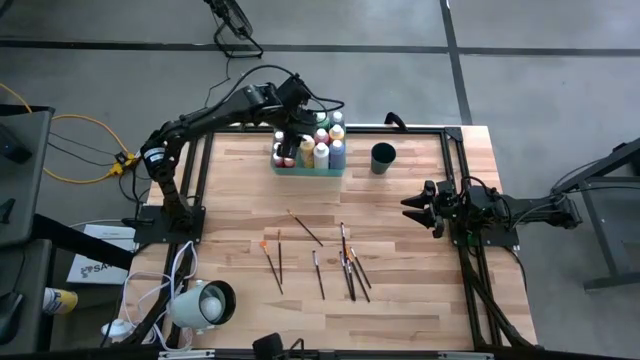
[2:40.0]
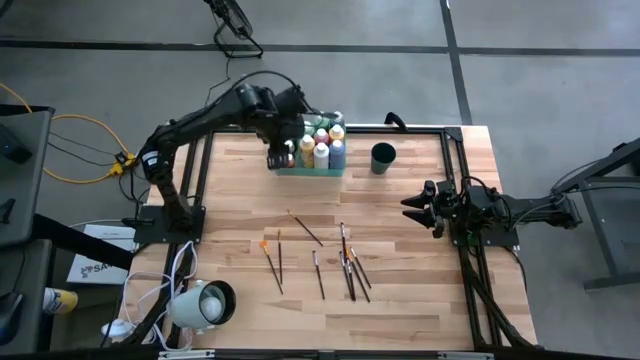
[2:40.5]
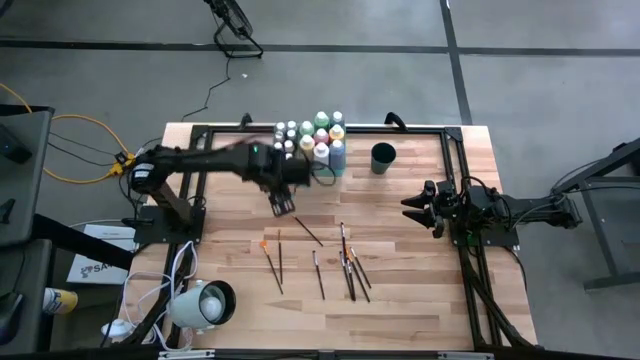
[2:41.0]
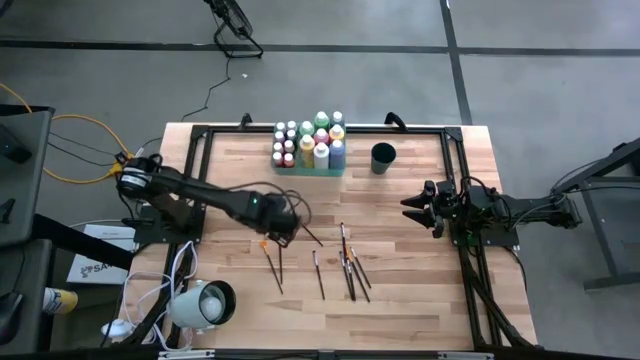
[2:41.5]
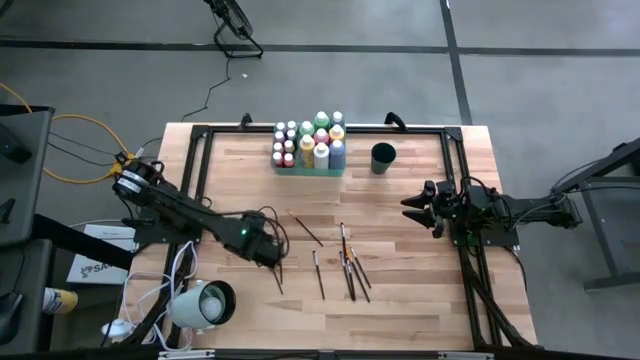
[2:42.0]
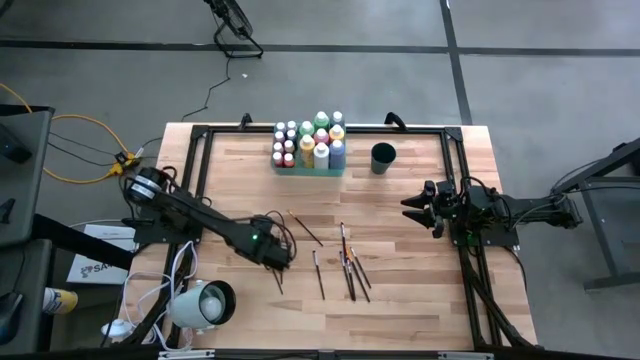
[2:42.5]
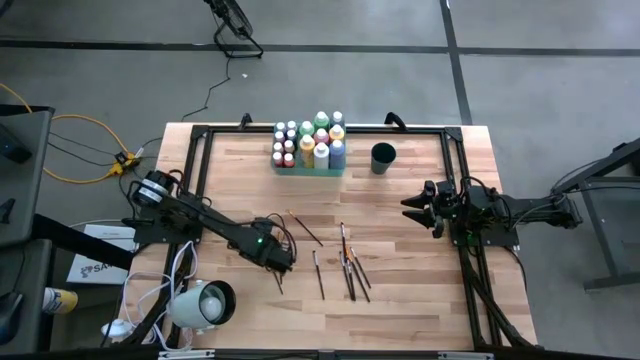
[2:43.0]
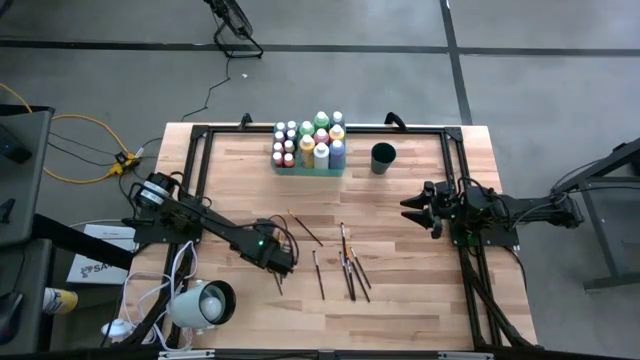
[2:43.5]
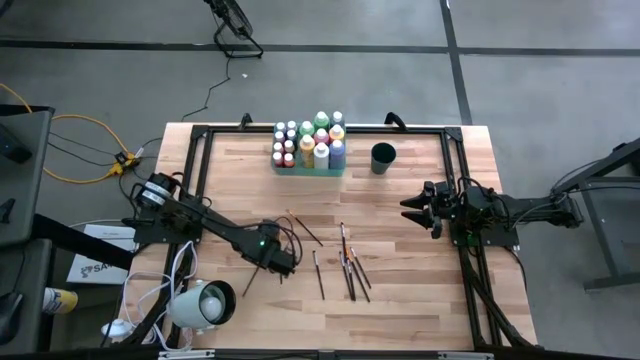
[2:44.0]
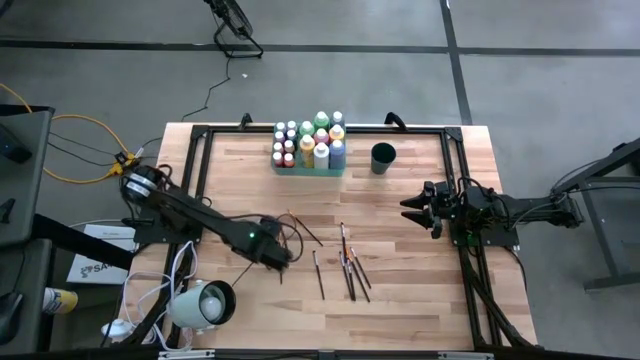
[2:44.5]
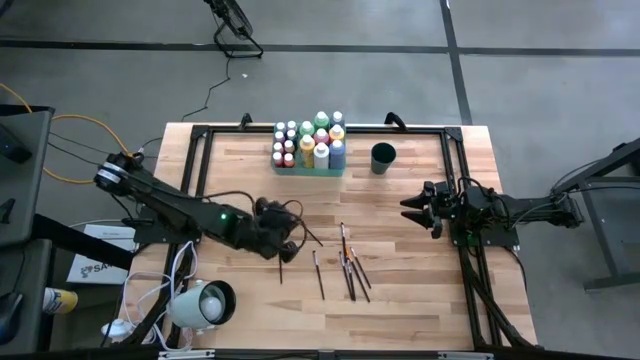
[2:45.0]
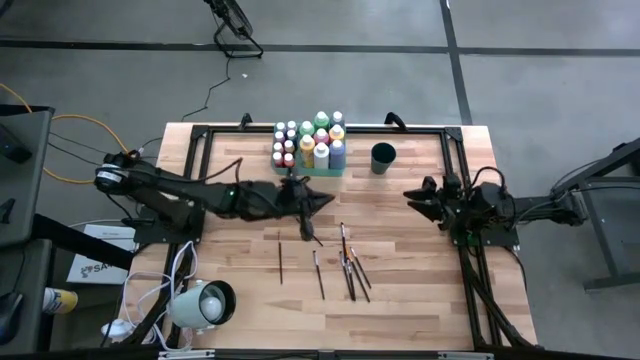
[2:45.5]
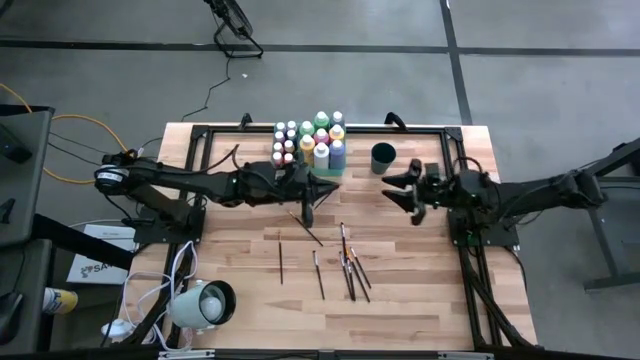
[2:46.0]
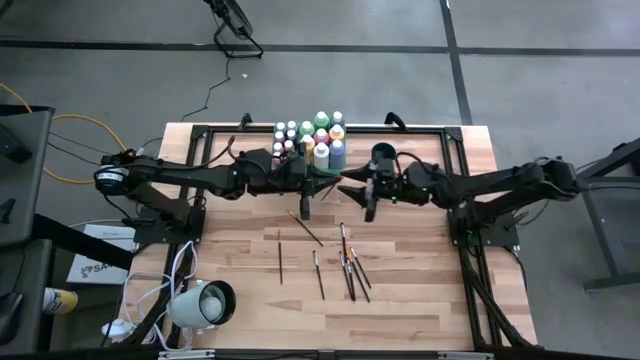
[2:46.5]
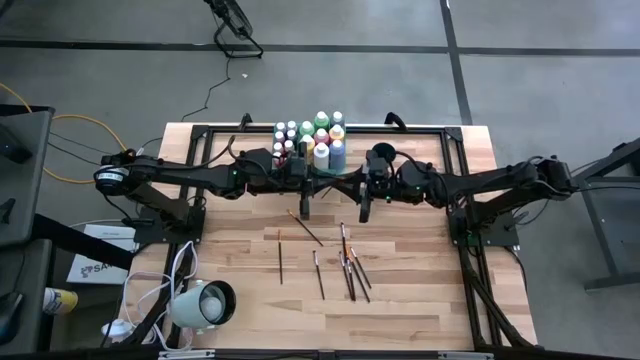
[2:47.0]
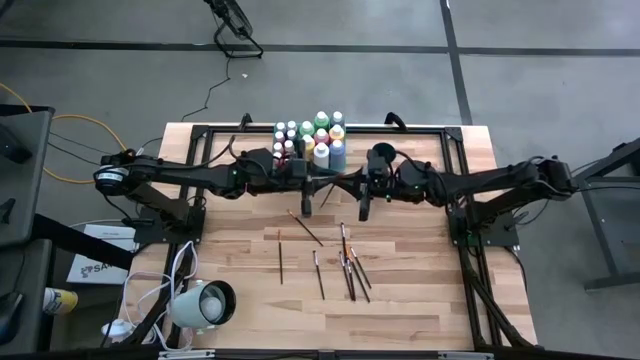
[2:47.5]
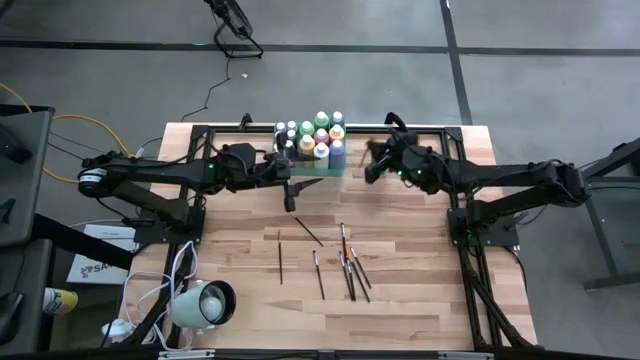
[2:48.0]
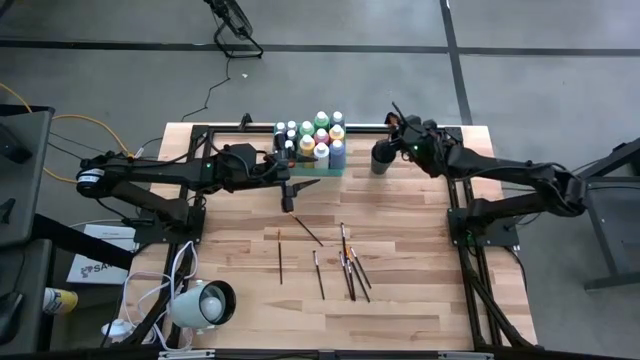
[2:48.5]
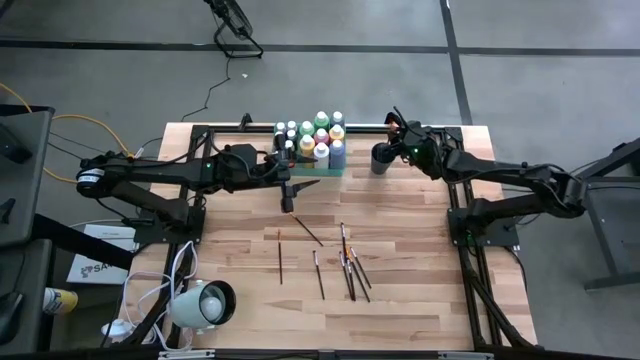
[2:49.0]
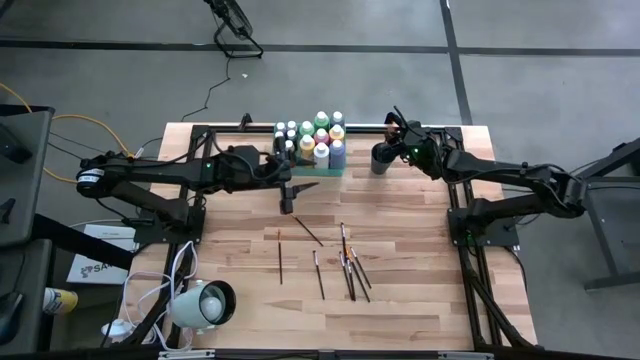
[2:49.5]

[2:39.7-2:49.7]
Task: Pick & Place Paint Supplies
Put the orange paint brush into the green cup

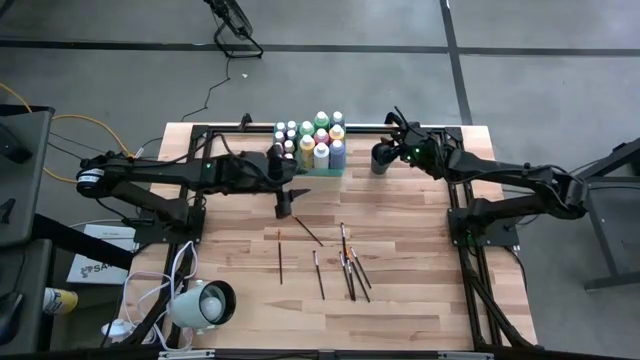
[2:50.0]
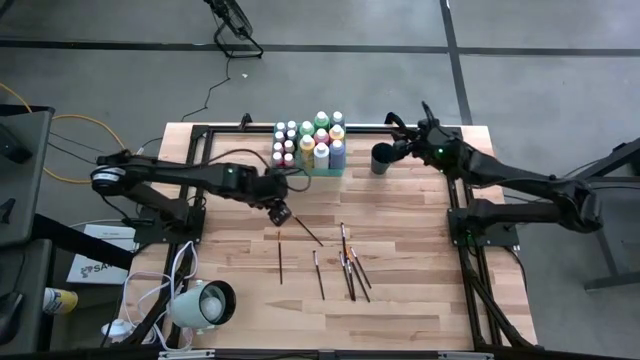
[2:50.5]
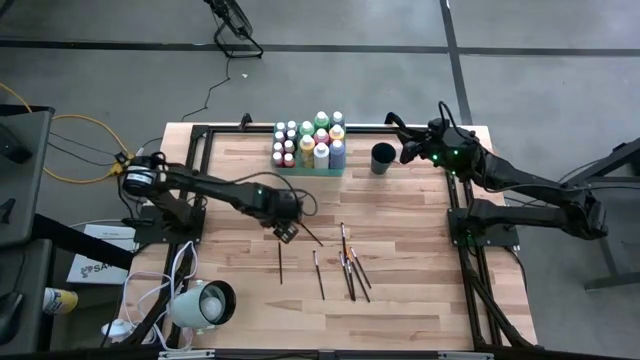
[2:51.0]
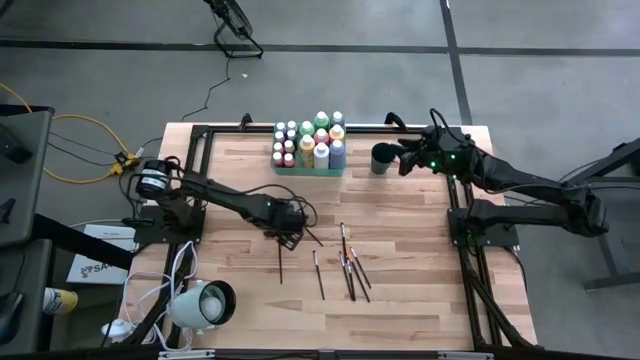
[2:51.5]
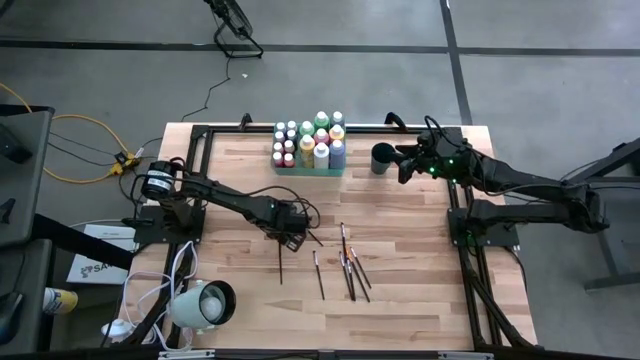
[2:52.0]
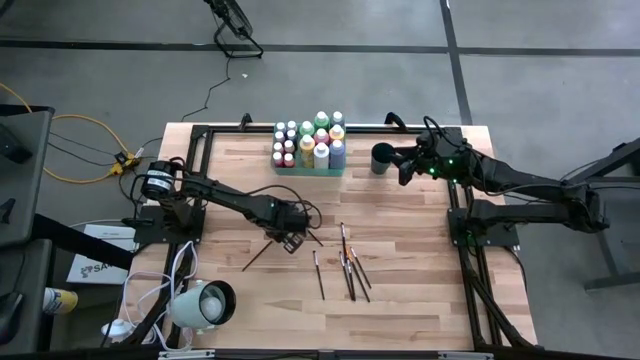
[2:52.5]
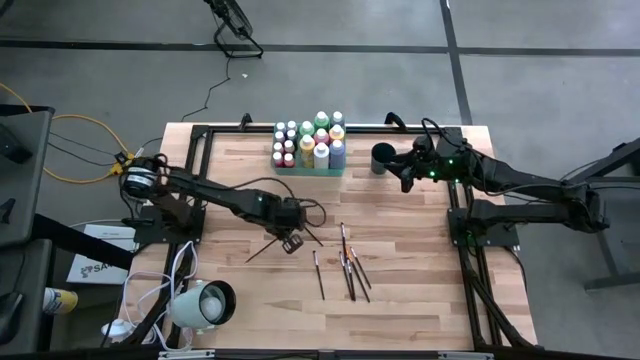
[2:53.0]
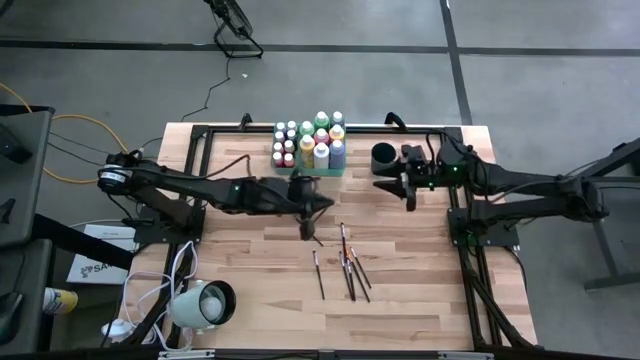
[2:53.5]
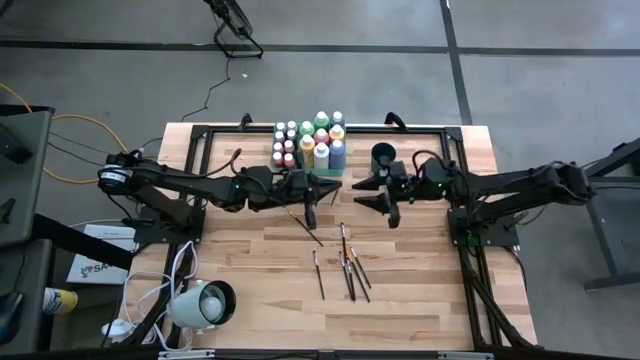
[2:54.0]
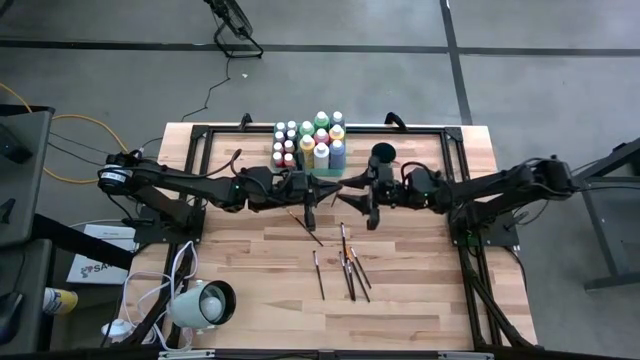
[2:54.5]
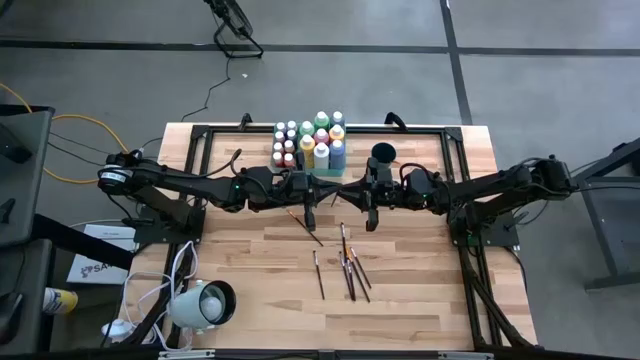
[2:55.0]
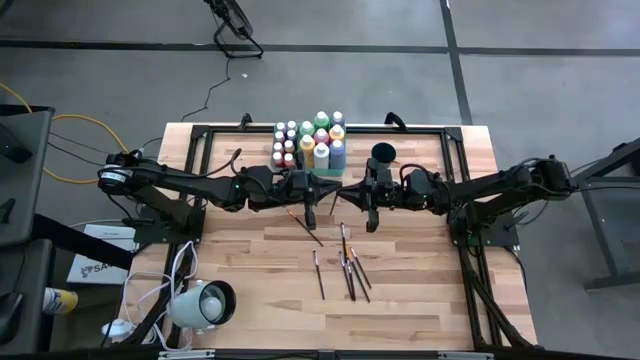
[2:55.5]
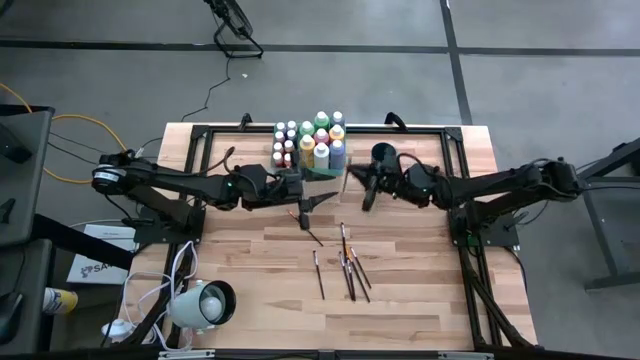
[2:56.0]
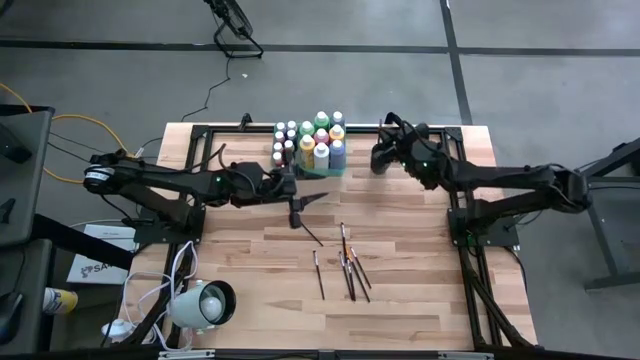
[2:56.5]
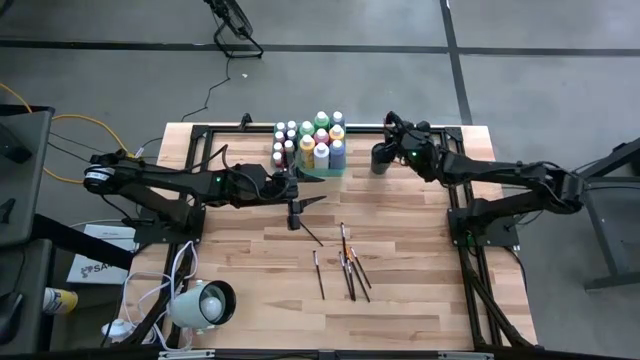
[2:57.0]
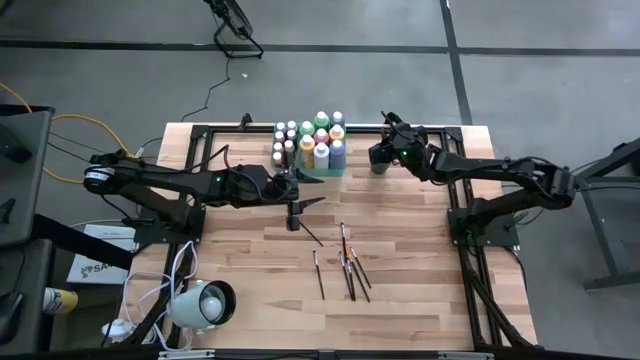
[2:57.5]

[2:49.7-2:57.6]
Put the orange paint brush into the green cup

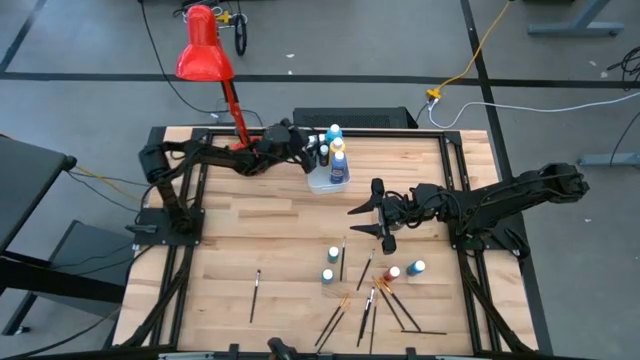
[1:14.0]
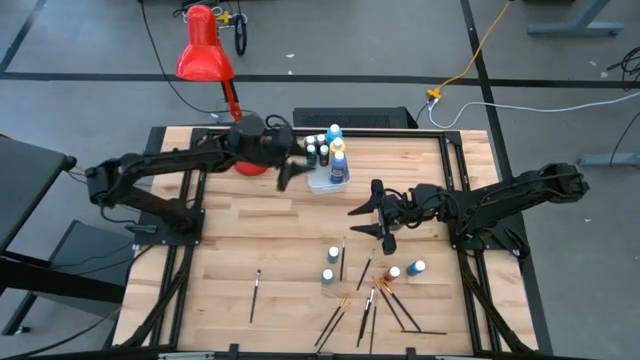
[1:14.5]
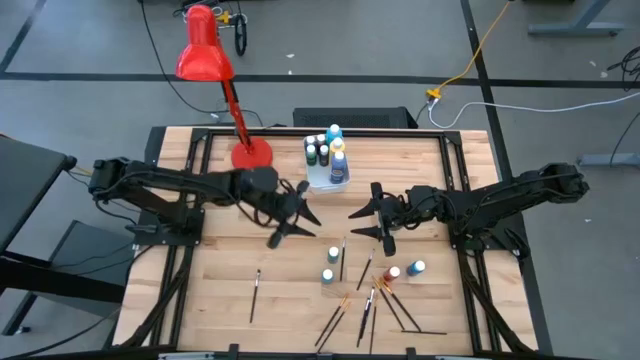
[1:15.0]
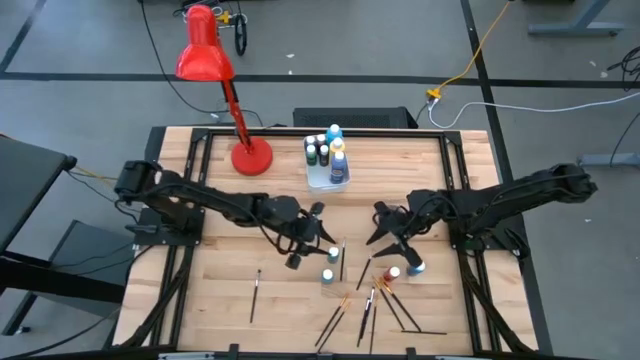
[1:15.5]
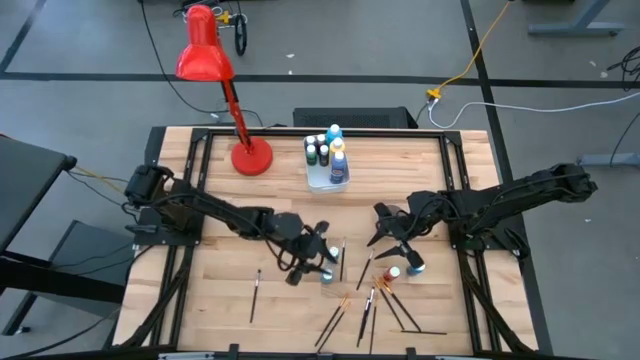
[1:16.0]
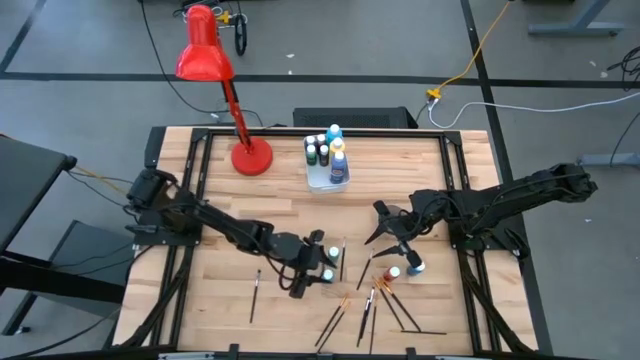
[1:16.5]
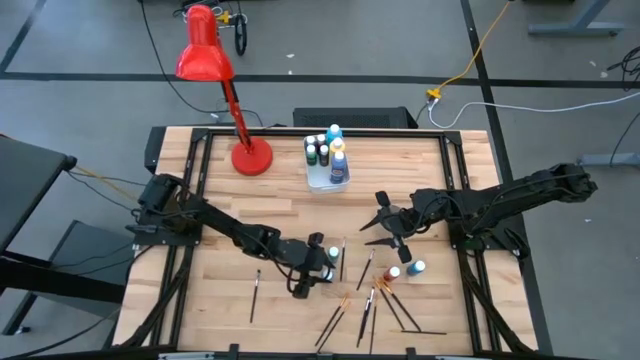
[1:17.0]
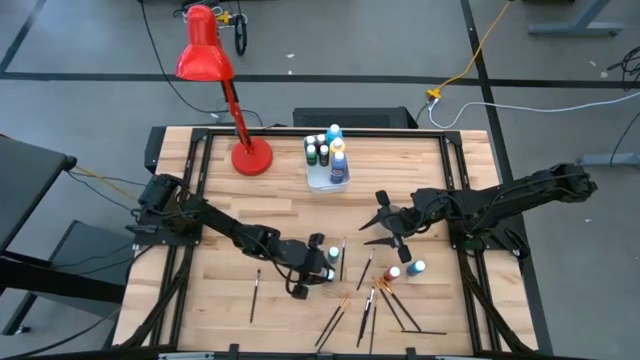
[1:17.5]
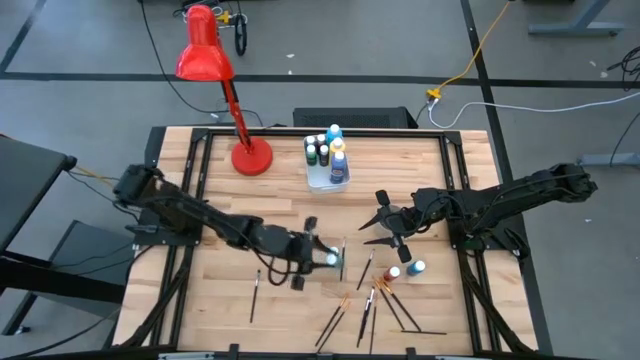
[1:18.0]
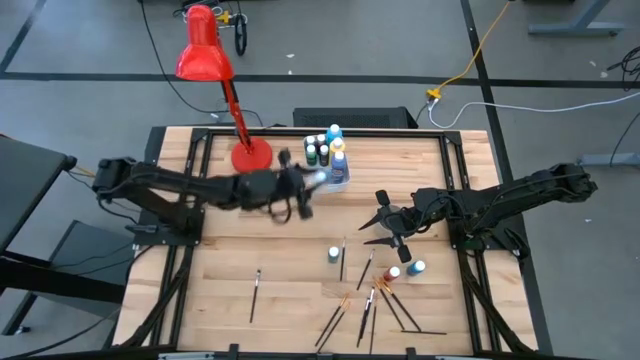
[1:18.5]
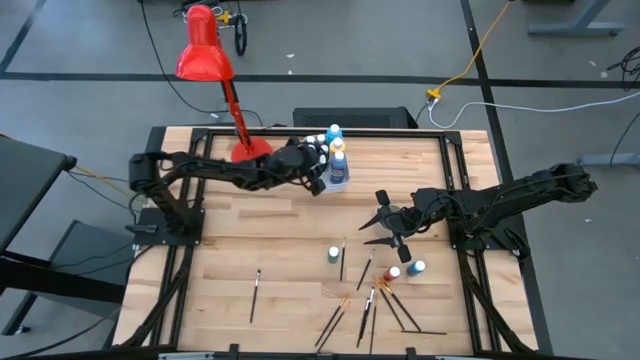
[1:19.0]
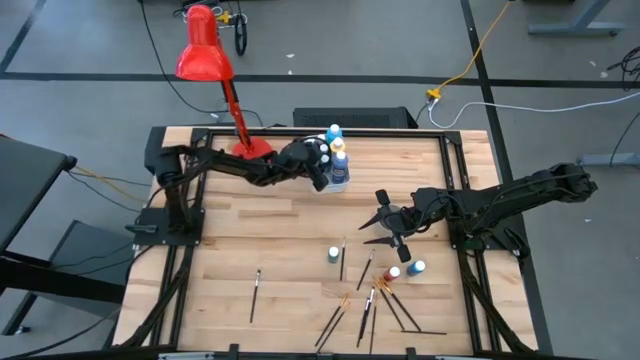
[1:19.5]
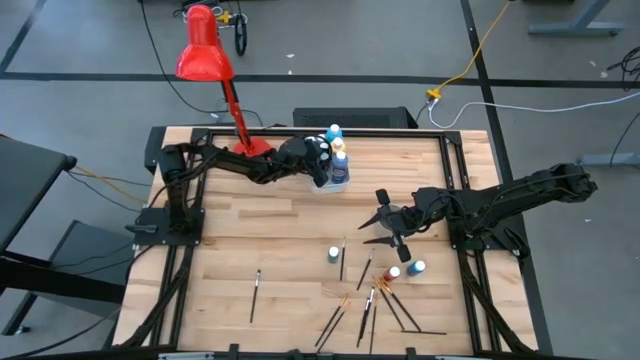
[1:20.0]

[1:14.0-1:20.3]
Task: Pick & Place Paint Supplies
Put the small light blue paint bottle into the white bin
